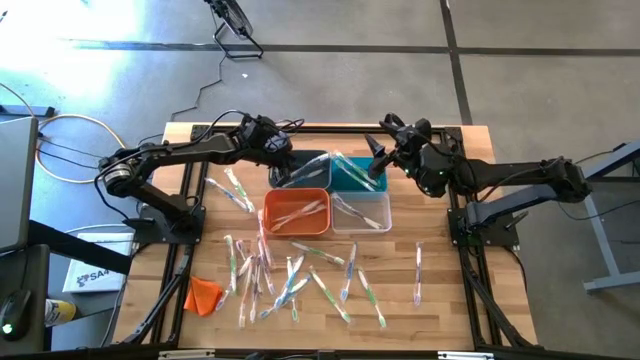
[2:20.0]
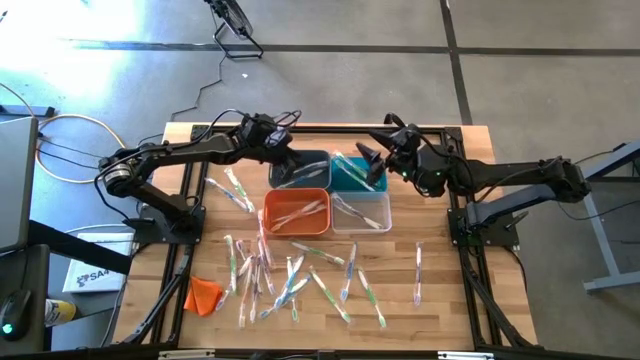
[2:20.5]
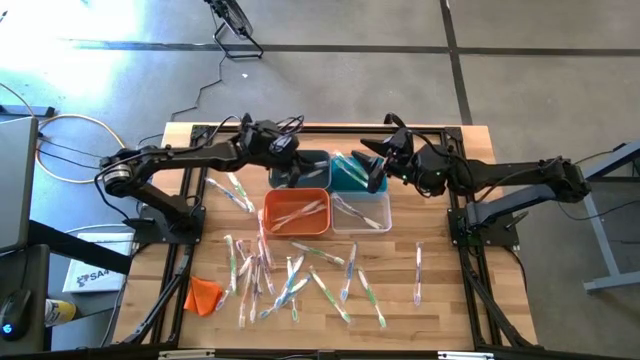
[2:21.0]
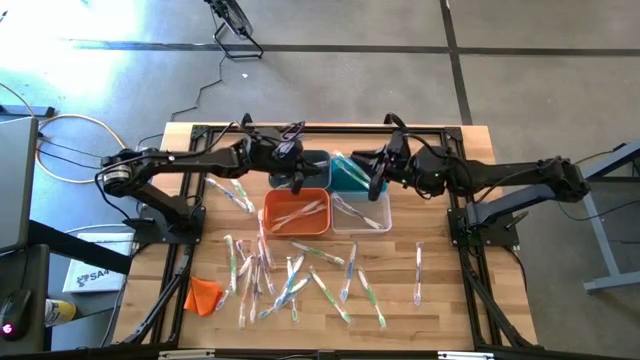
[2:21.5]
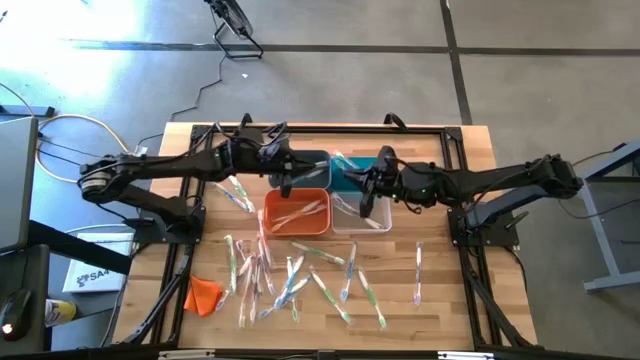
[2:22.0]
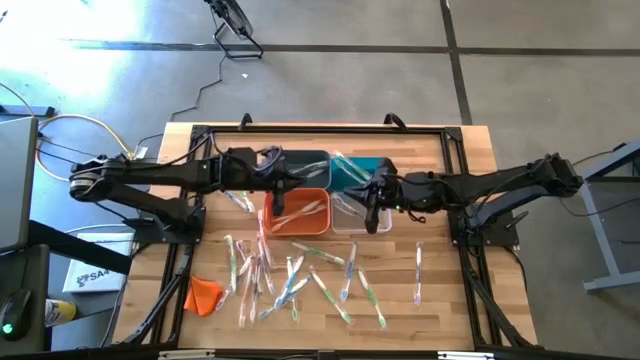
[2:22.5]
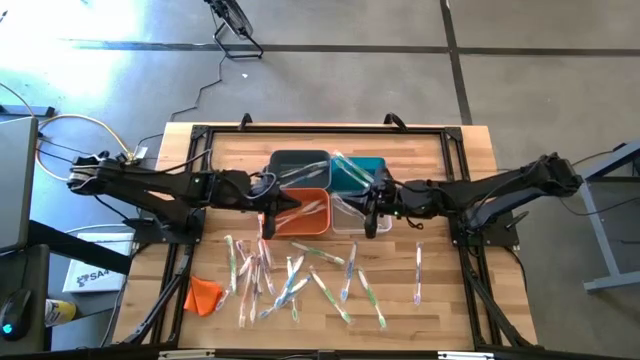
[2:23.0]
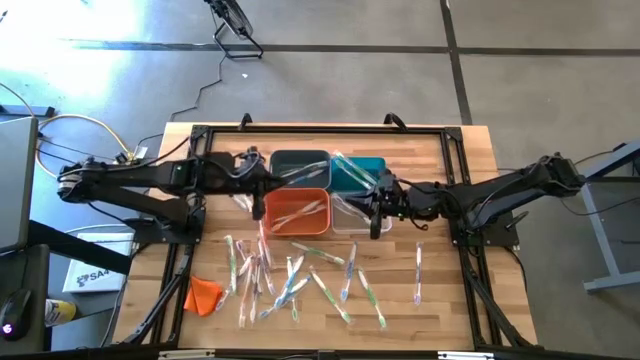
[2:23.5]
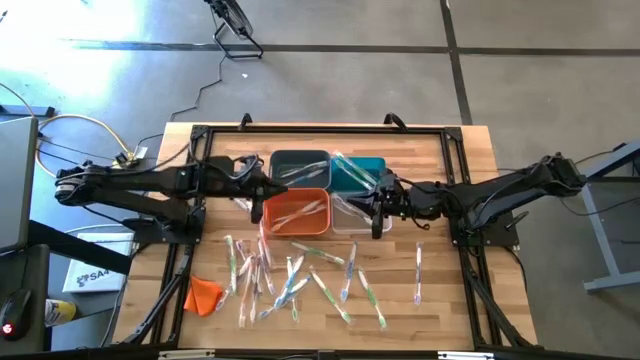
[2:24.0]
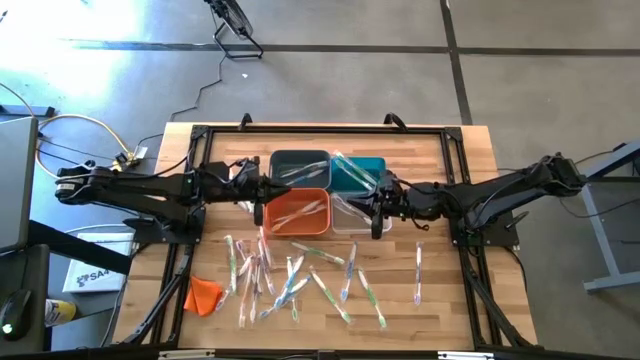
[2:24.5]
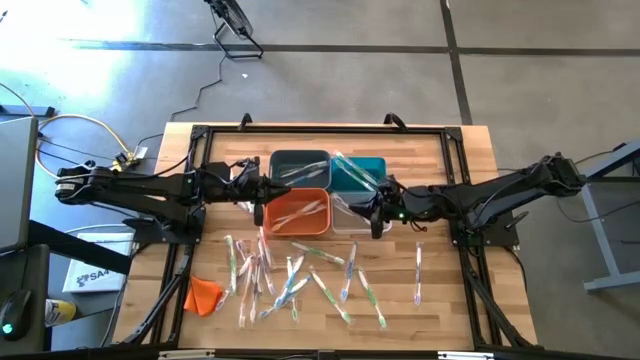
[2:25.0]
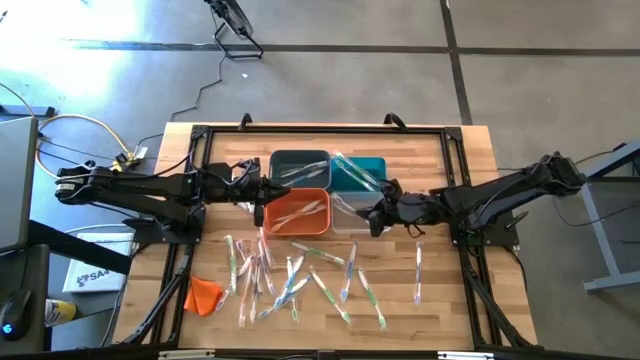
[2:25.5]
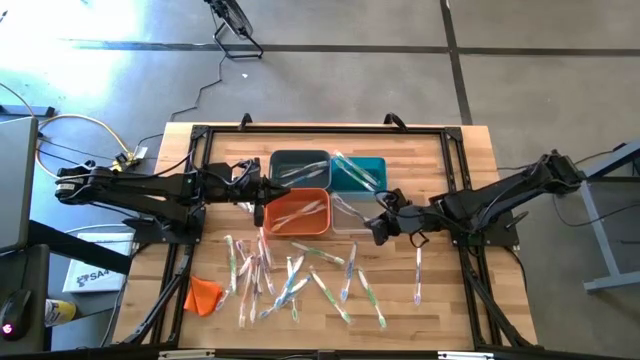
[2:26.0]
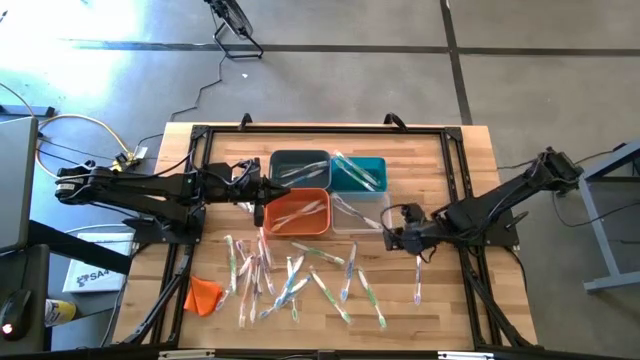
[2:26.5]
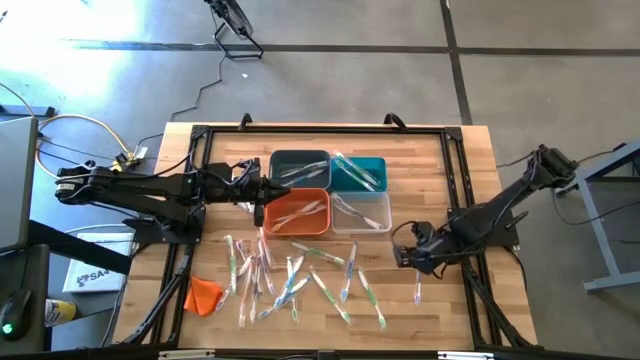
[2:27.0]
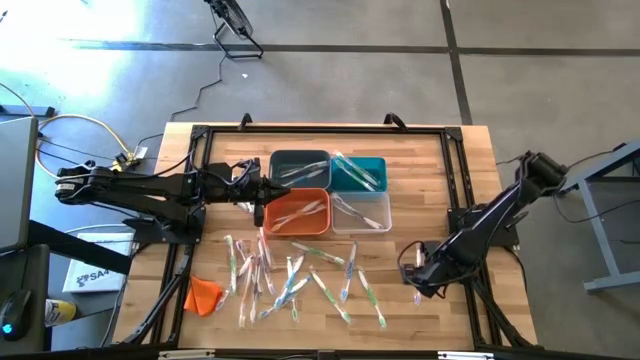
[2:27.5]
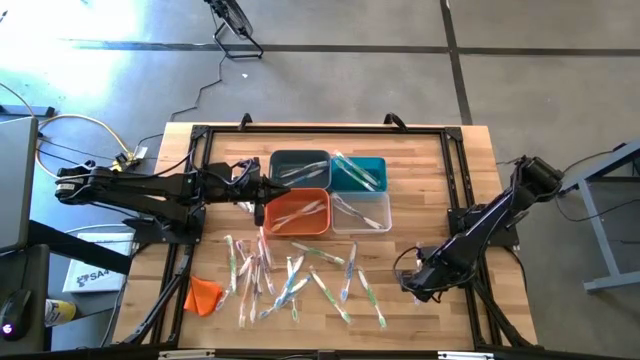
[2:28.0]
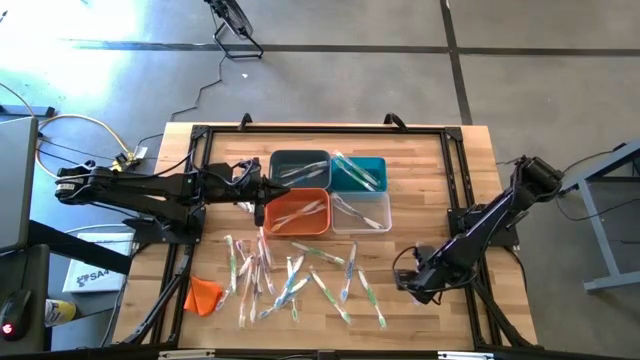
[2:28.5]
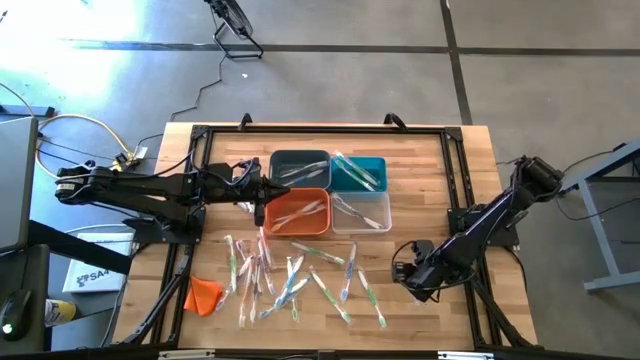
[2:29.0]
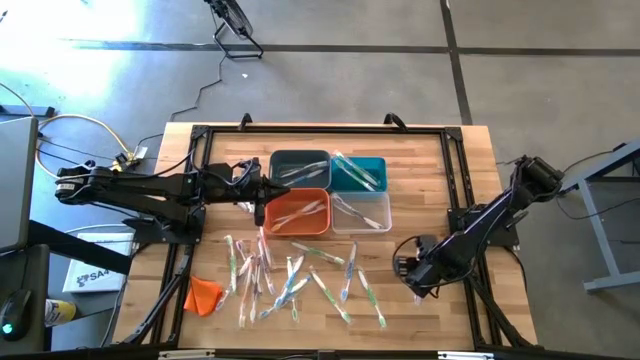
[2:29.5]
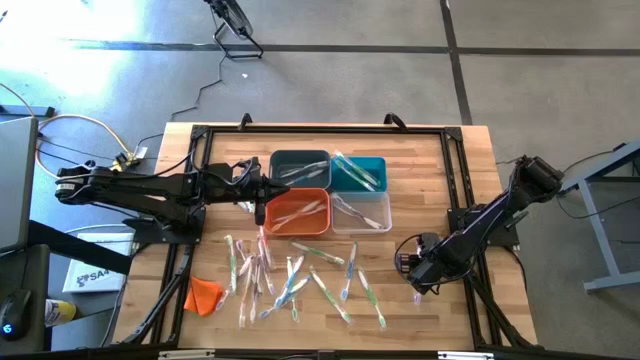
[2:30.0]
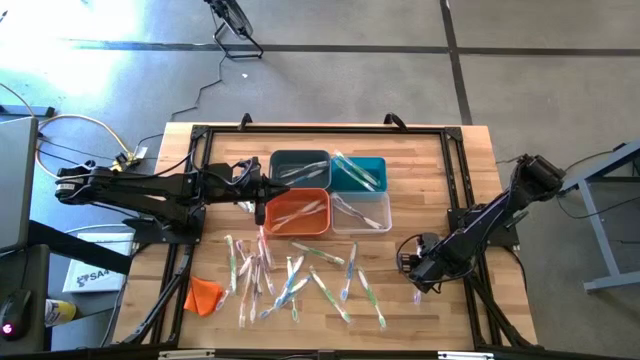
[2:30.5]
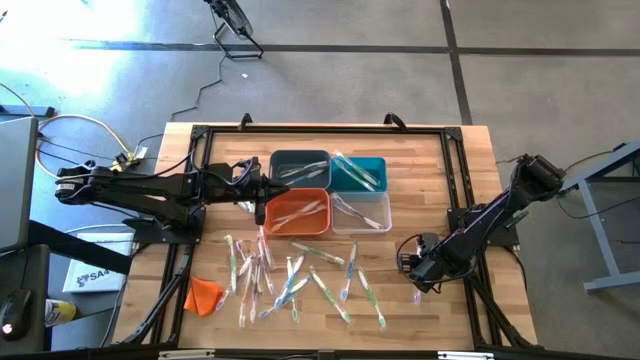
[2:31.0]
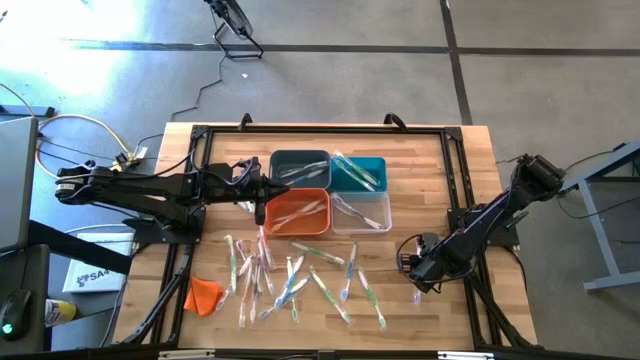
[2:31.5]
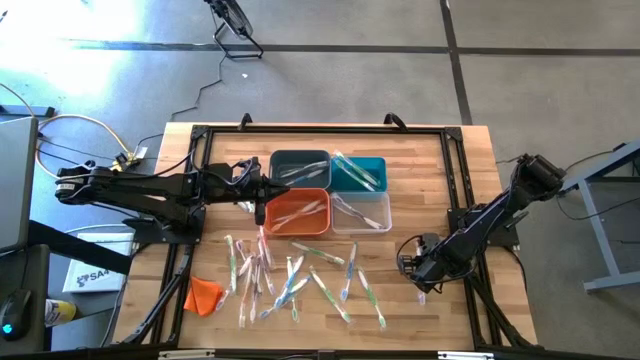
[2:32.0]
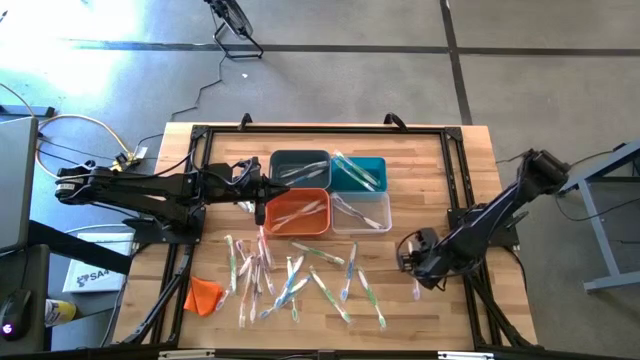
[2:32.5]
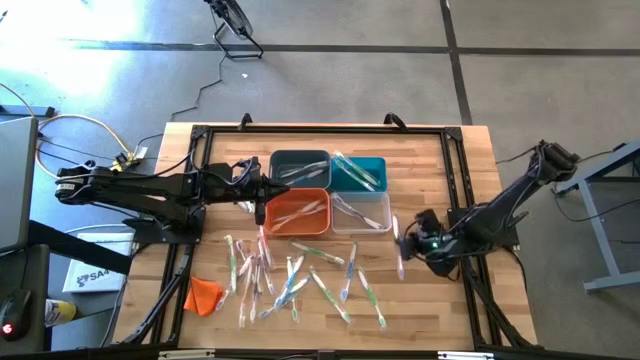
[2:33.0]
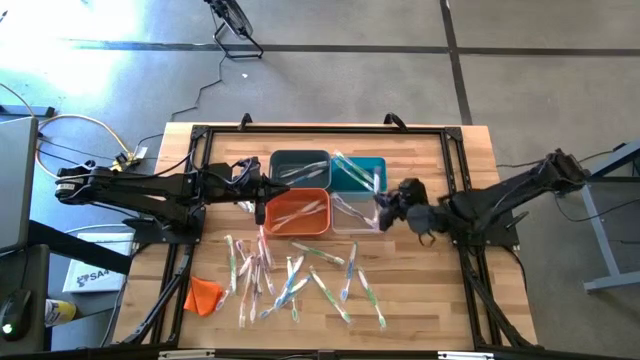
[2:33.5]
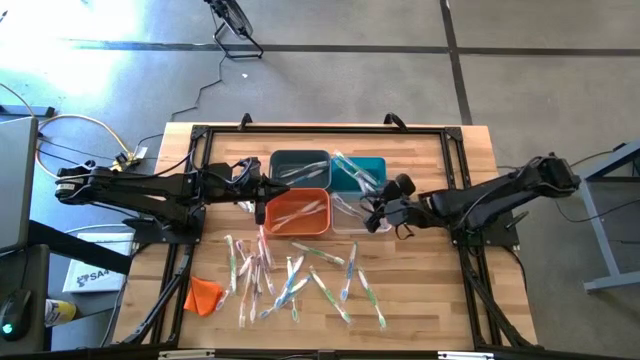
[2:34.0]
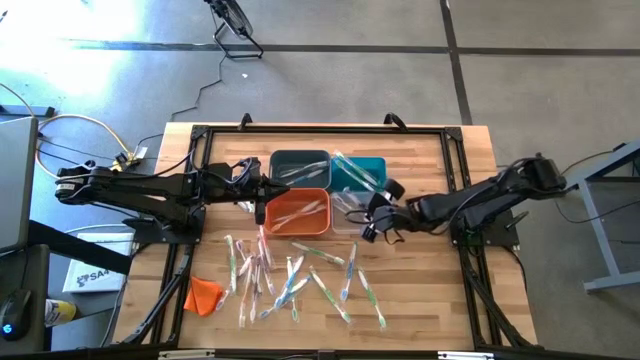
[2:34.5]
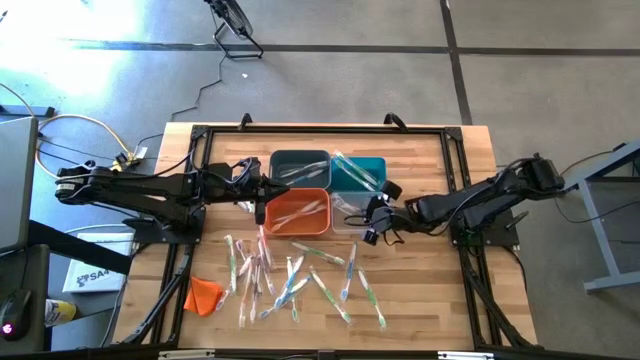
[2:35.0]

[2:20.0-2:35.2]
Task: Pick & Place Toothbrushes
Put the purple toothbrush into the transparent bin

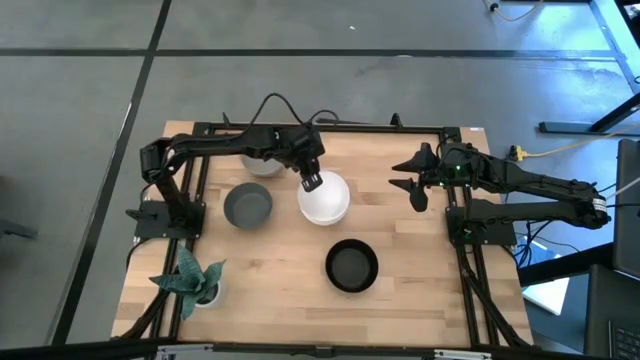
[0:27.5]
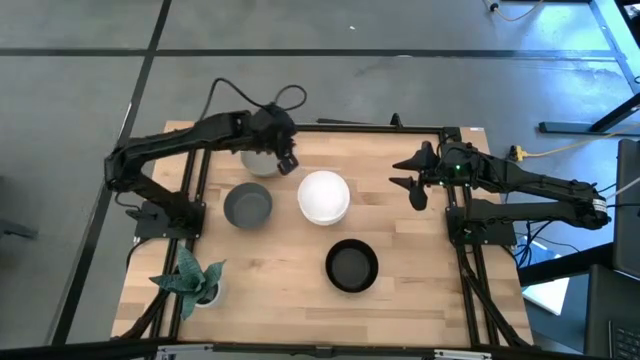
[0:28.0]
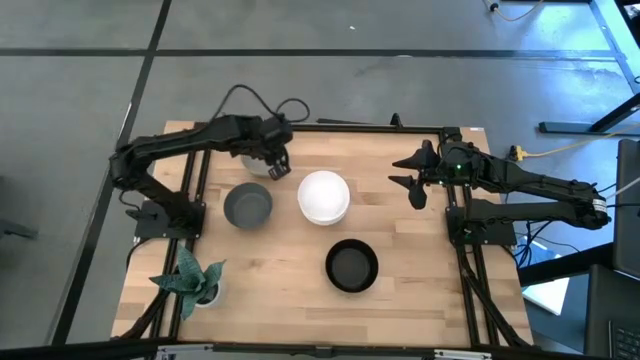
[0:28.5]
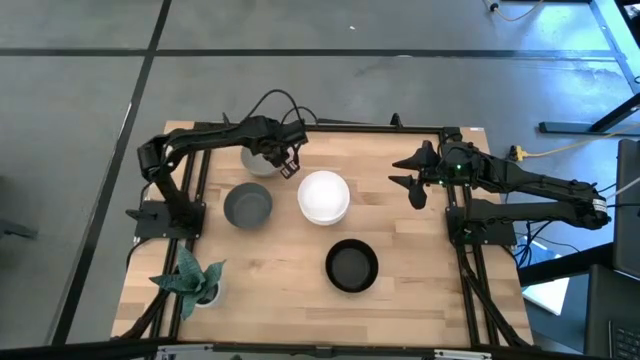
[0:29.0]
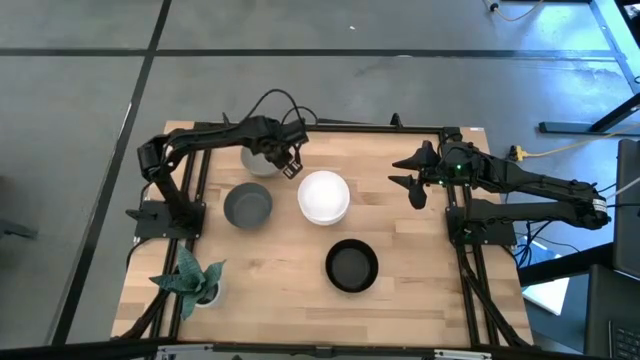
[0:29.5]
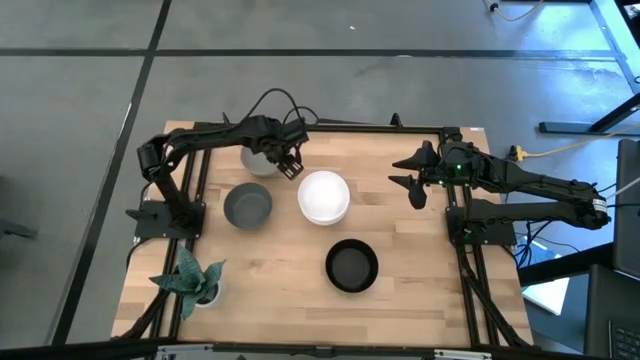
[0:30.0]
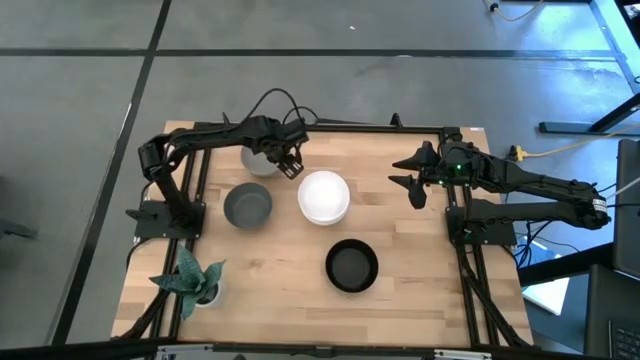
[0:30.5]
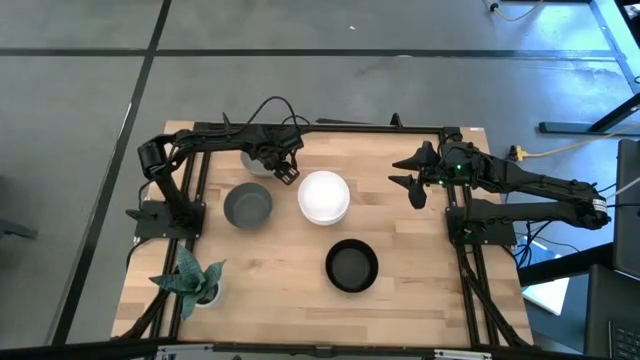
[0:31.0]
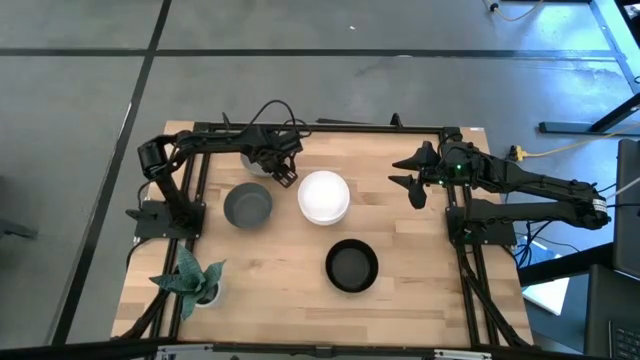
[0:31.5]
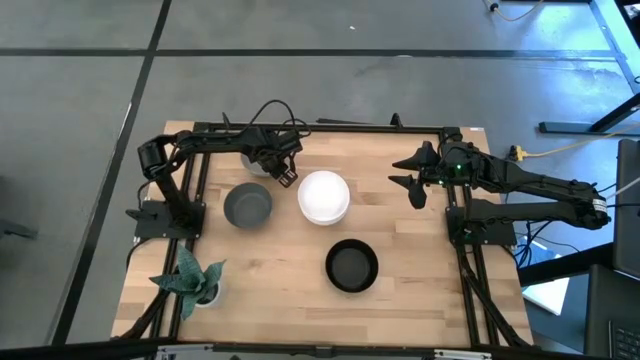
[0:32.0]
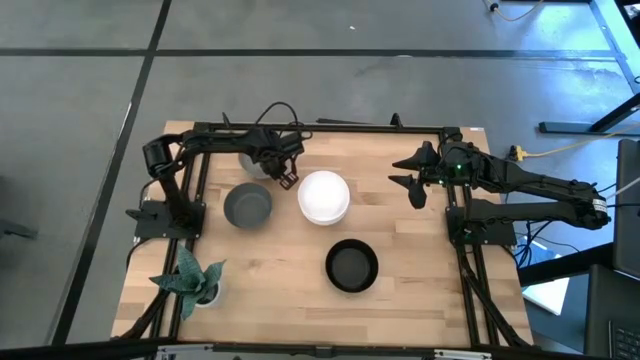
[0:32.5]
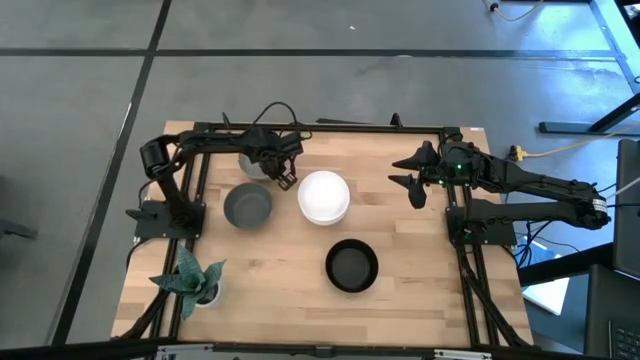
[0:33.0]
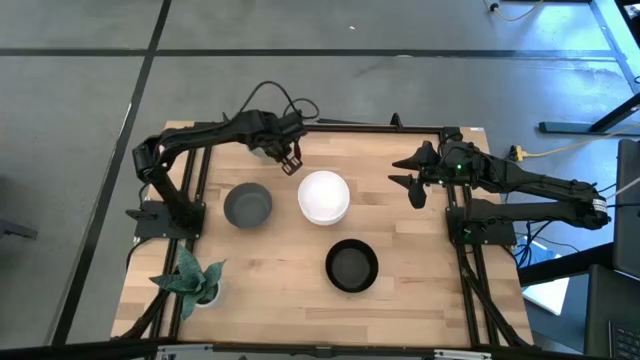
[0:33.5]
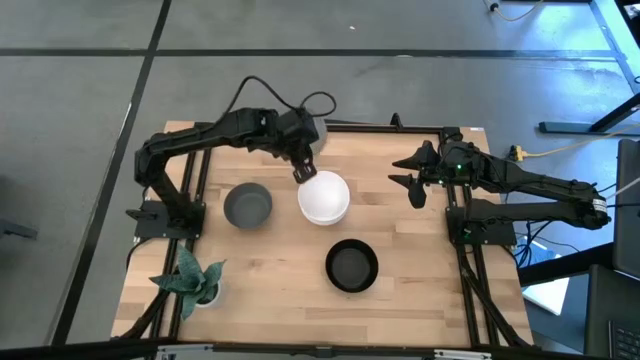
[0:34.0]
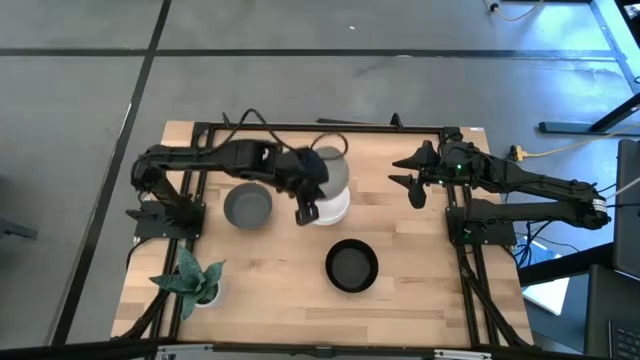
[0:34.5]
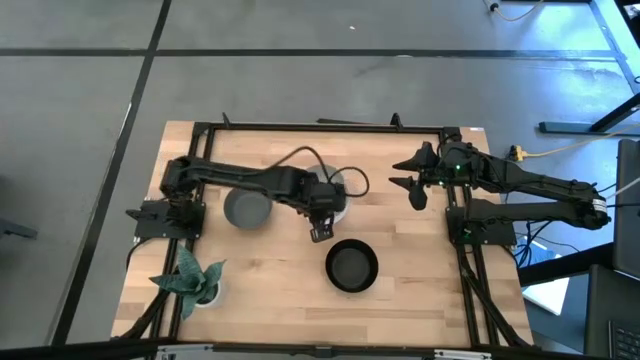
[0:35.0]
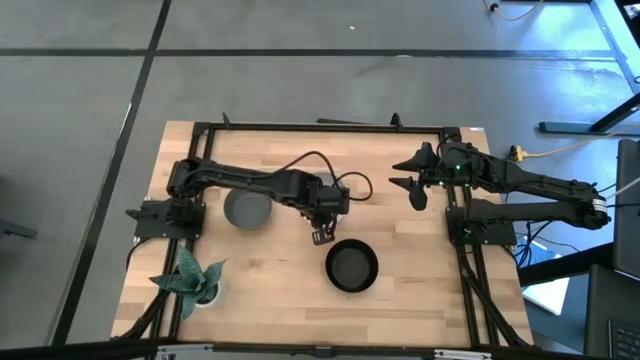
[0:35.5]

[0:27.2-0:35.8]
Task: Nest bowls inside each other
Stack the light gray bowl on top of the white bowl
